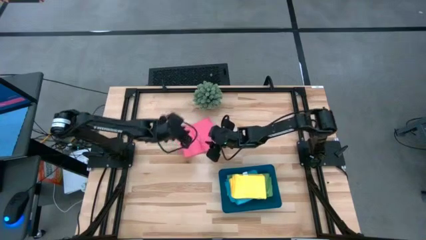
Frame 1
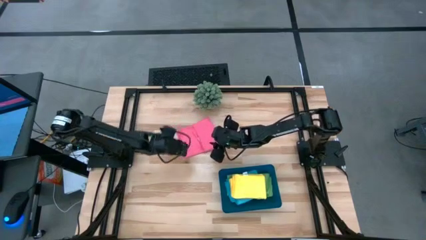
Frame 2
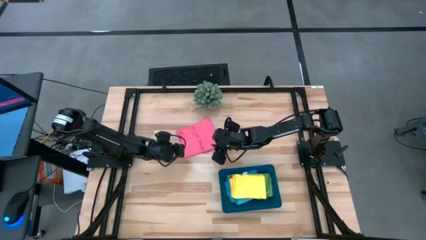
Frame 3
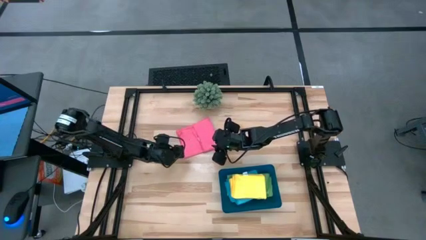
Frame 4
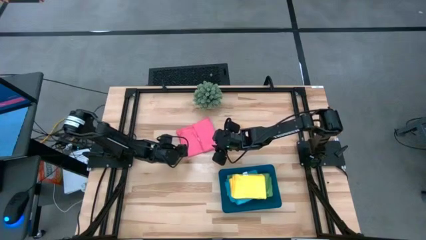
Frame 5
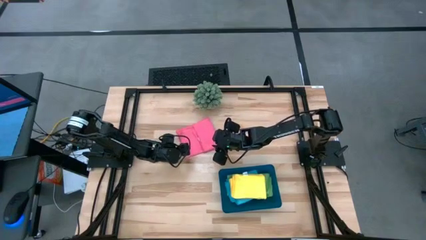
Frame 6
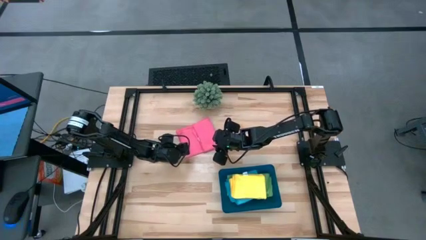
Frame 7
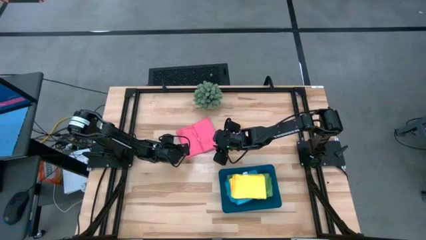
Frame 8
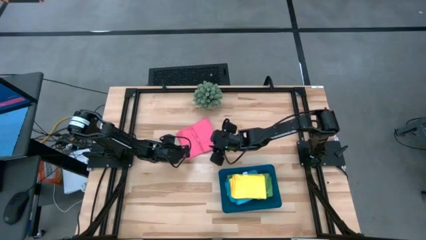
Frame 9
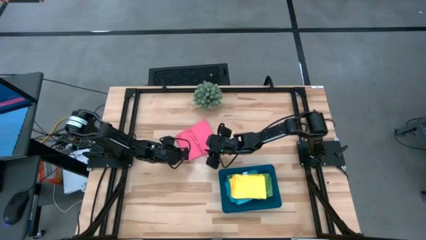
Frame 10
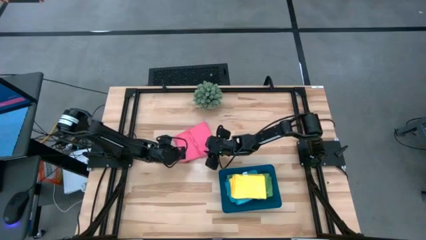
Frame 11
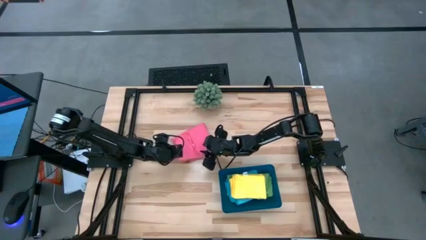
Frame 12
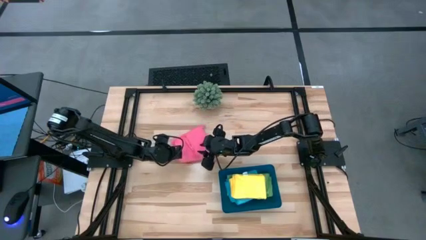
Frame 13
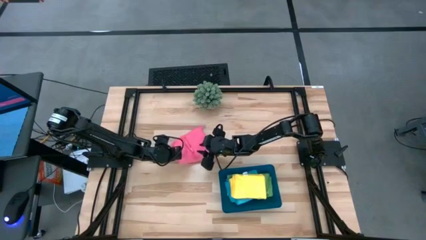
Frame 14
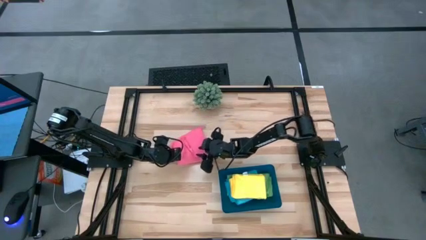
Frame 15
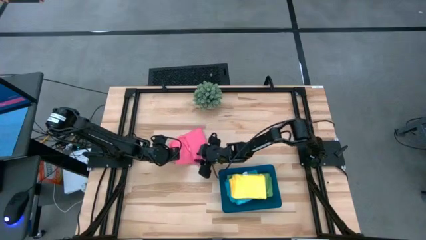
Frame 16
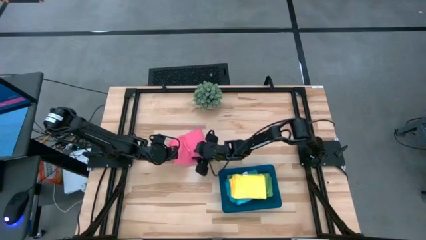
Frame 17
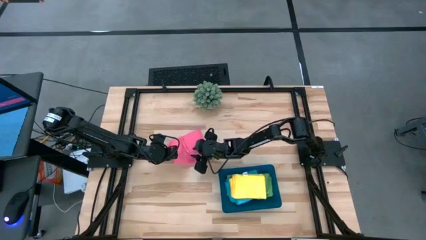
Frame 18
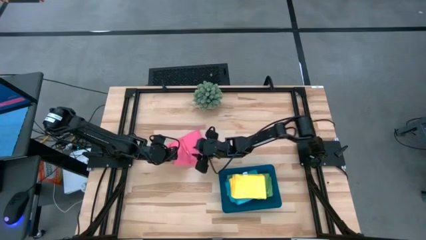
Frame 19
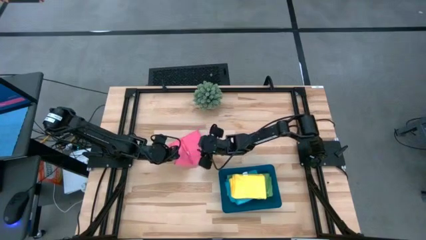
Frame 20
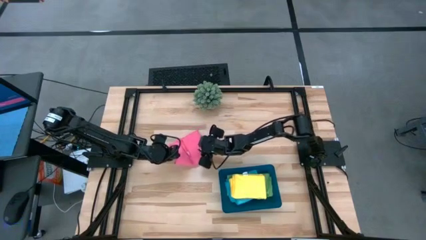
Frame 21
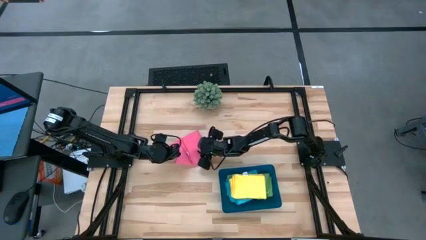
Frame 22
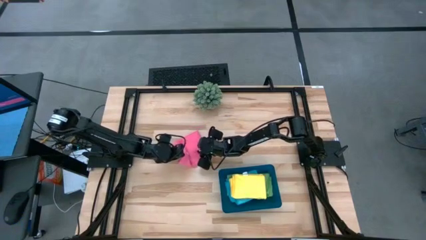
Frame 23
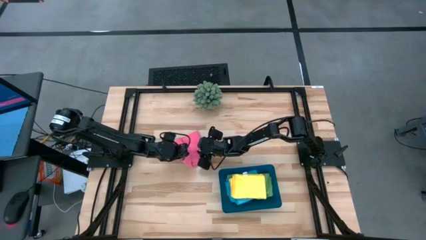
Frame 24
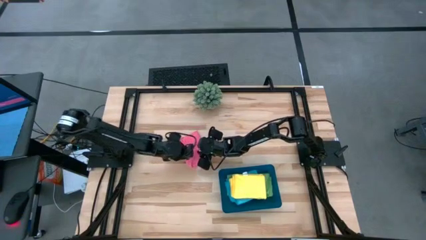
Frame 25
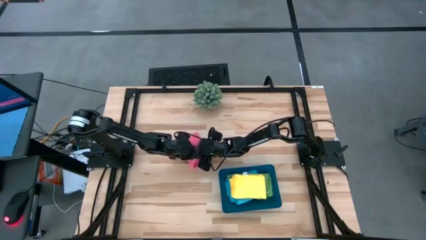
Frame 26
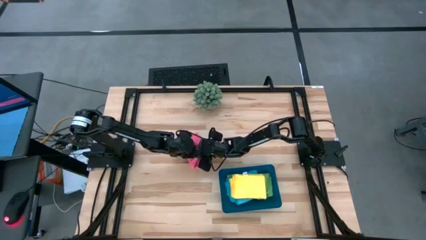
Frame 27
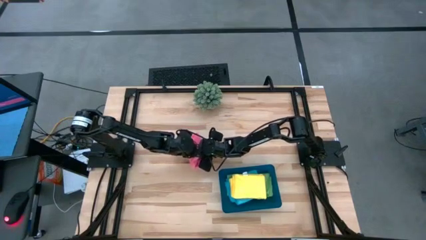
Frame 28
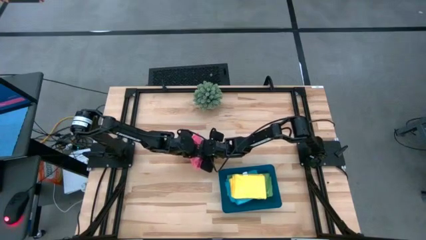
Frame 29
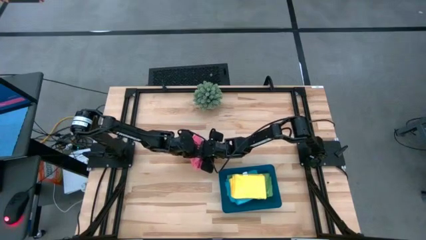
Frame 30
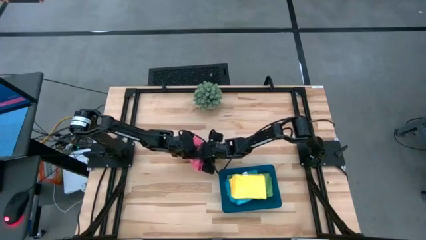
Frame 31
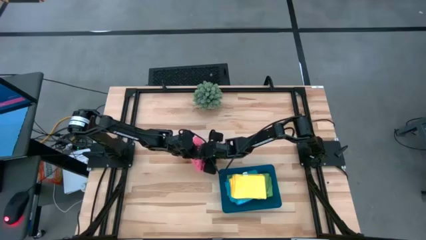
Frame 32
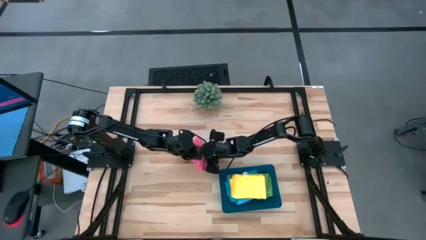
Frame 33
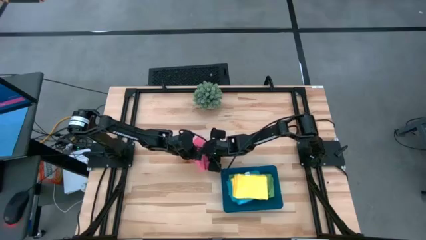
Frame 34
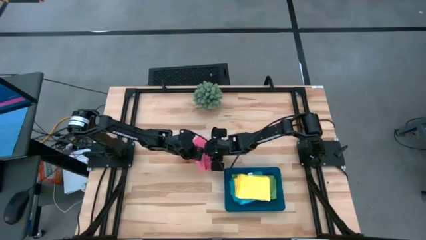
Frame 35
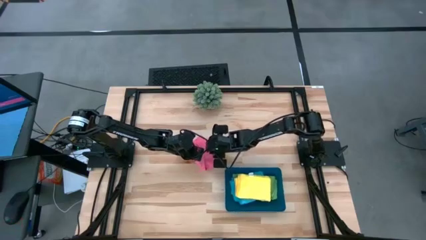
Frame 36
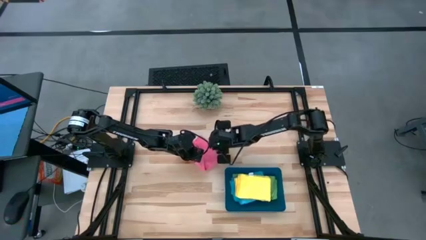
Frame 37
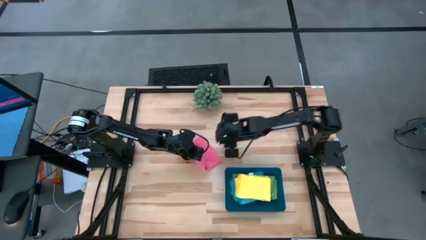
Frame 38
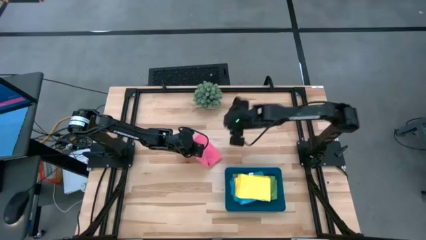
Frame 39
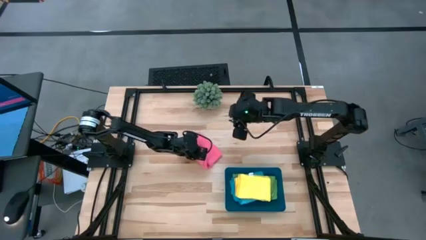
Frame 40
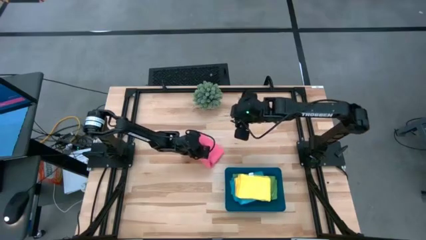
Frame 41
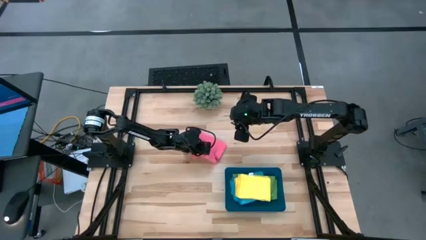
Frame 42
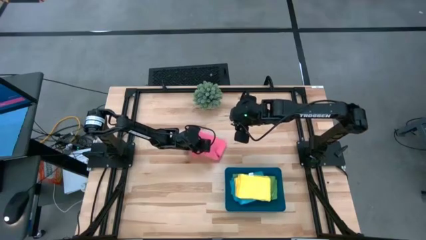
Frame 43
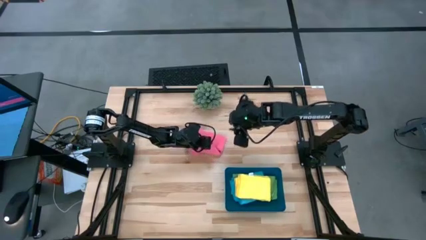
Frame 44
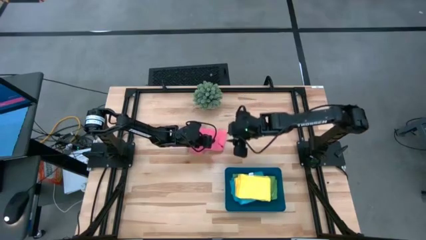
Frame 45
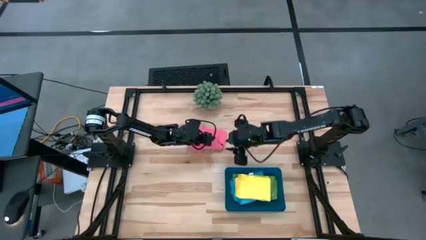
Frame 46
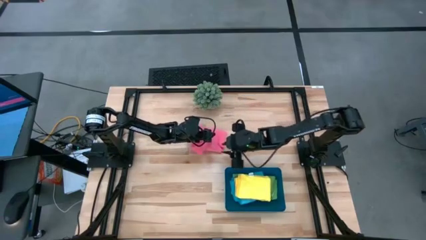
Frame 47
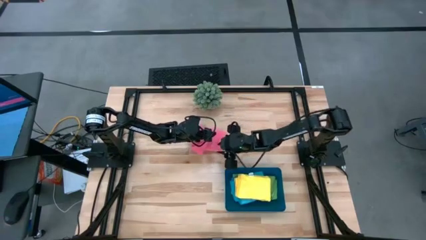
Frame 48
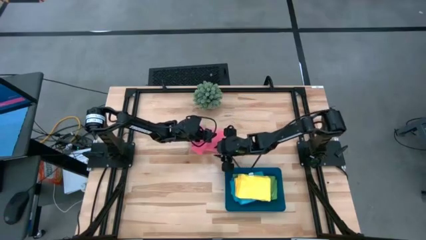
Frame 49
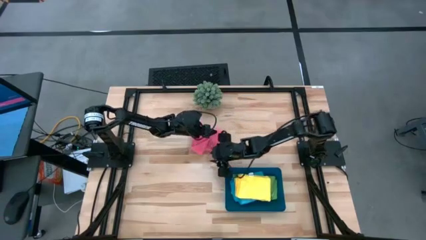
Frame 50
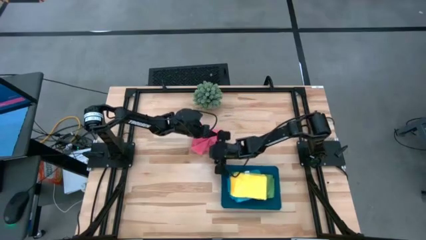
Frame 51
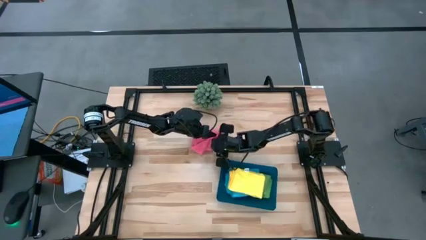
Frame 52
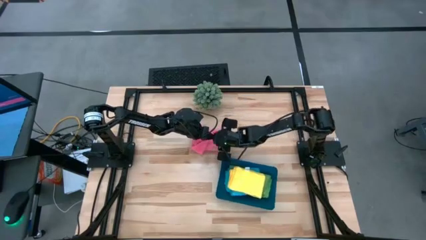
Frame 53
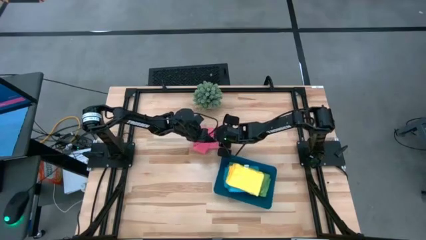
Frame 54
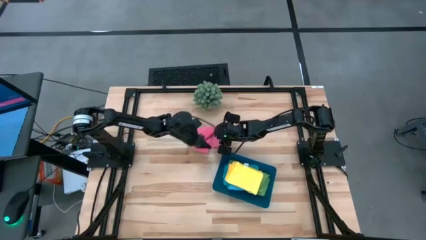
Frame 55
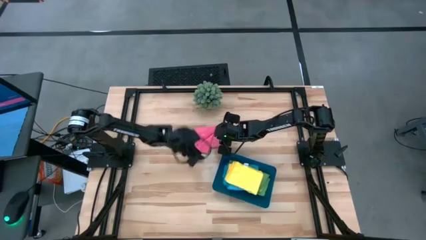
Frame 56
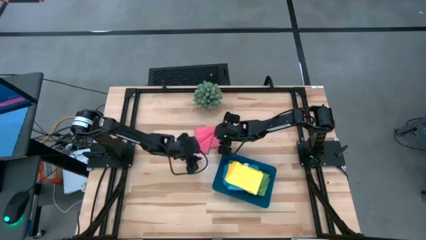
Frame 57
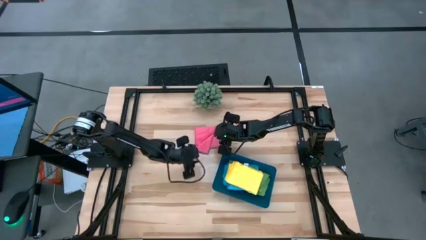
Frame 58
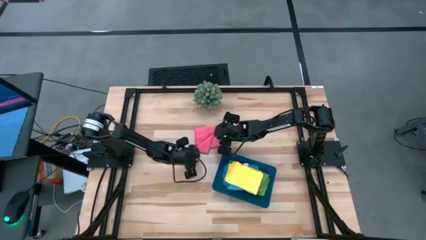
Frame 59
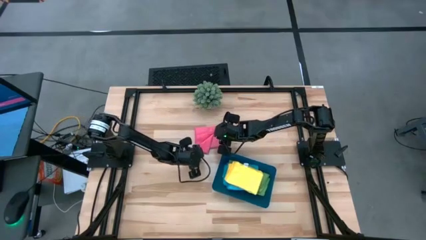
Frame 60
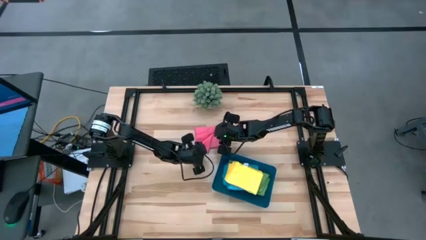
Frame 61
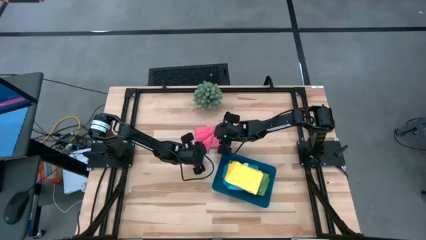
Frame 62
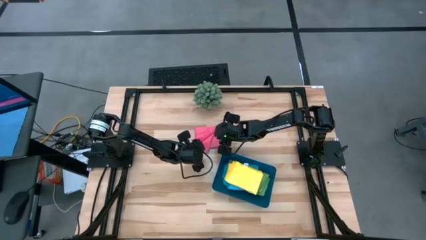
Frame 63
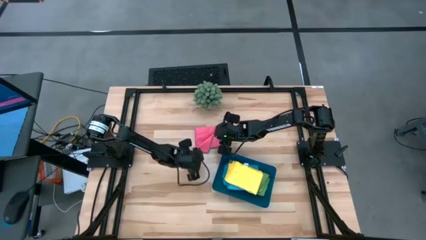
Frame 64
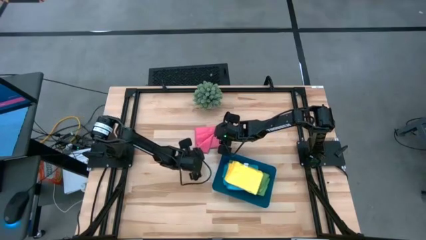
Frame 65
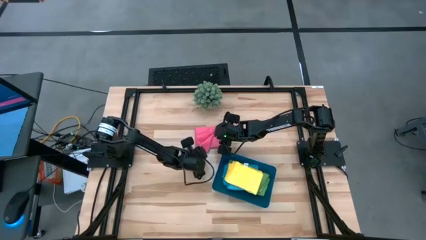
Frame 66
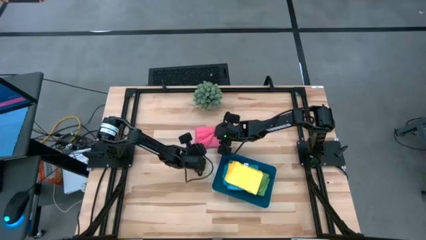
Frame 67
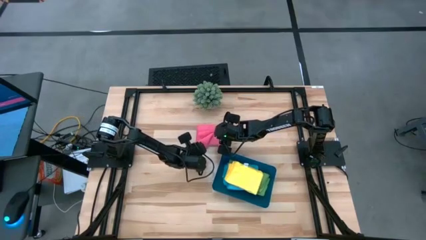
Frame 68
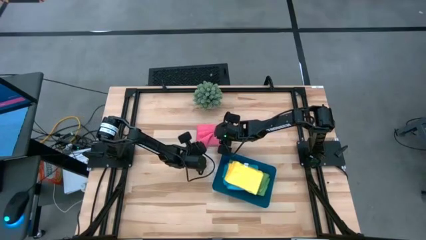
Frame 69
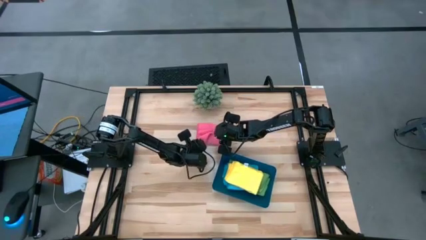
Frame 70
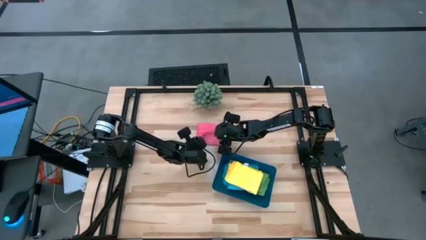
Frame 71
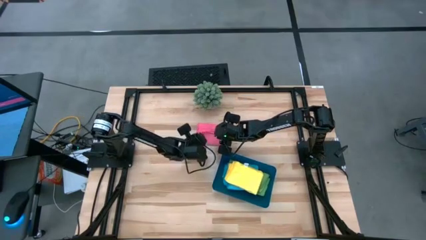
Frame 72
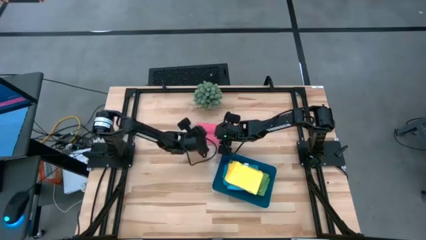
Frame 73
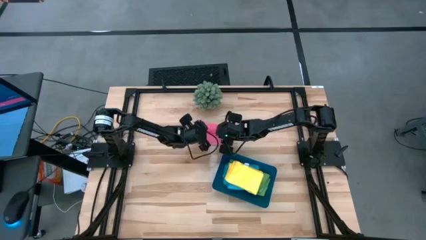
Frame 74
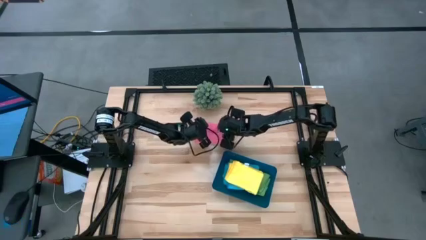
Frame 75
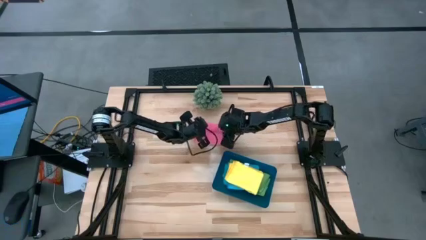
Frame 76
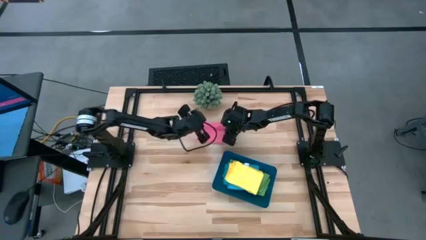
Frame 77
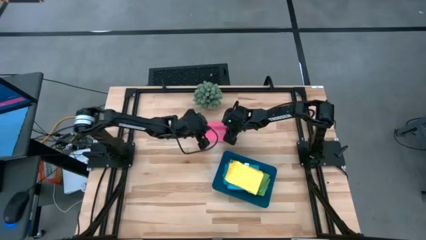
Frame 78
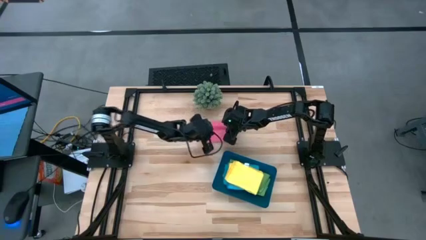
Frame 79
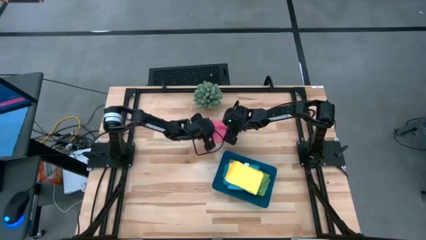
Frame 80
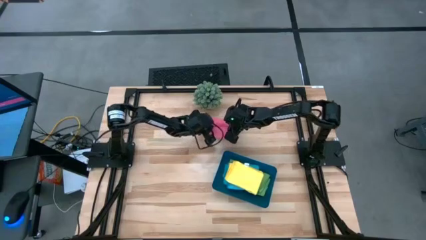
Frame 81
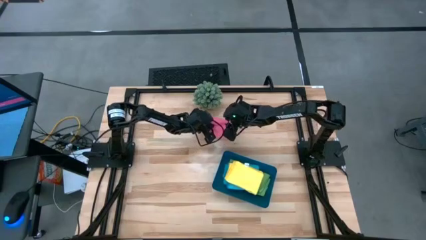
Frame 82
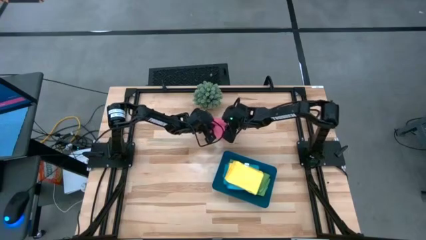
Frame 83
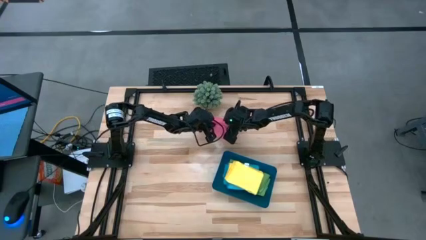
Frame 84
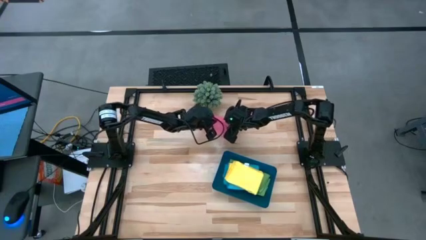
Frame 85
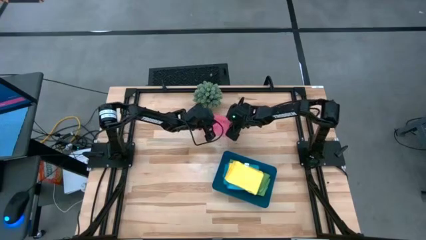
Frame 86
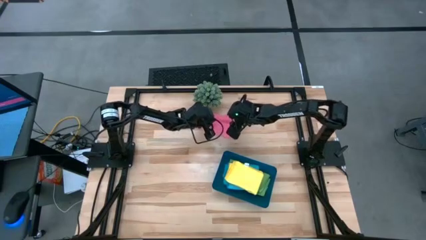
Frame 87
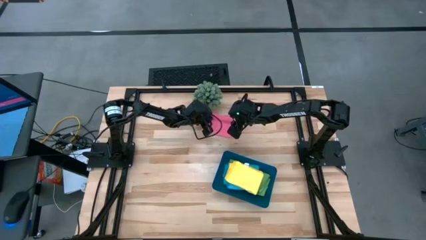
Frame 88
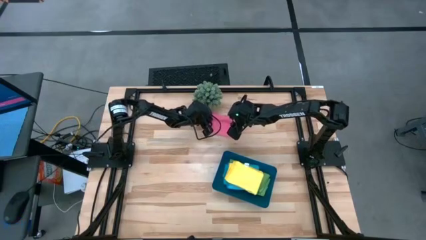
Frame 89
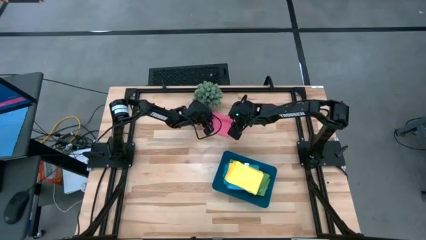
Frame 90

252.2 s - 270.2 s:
Task: Fold microfiber towels
Fold the pink microfiber towel
